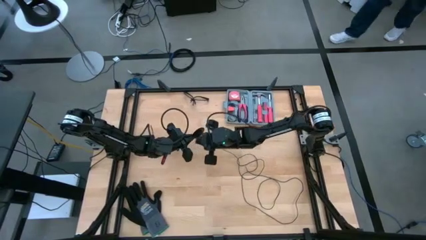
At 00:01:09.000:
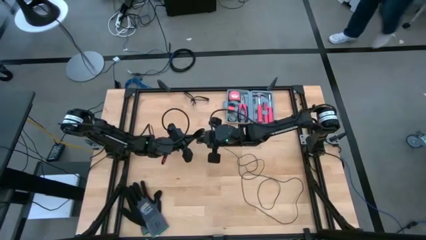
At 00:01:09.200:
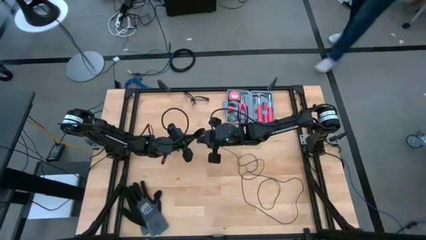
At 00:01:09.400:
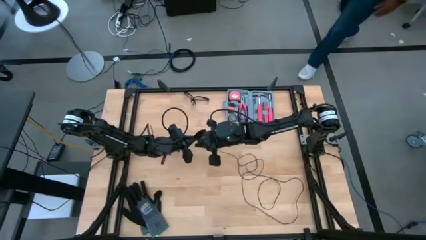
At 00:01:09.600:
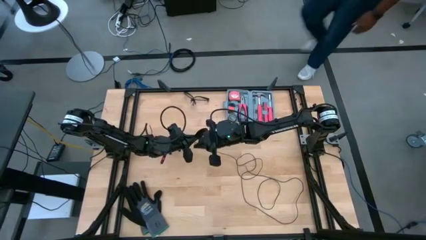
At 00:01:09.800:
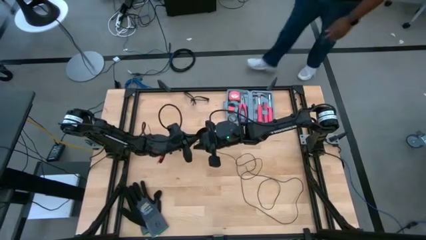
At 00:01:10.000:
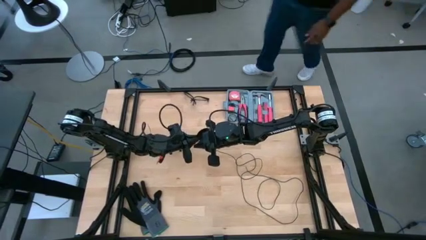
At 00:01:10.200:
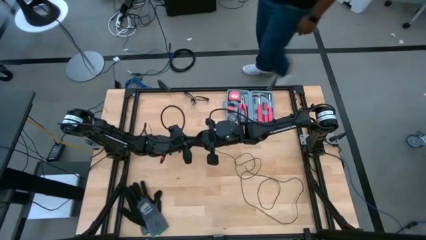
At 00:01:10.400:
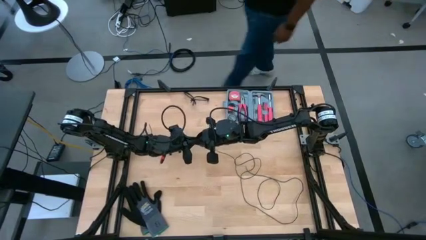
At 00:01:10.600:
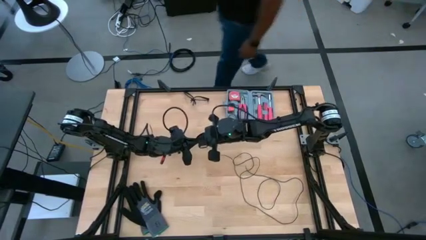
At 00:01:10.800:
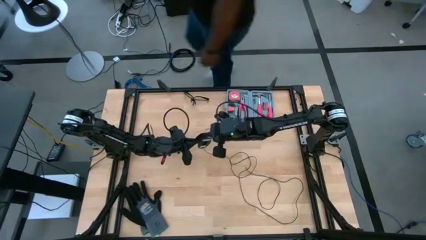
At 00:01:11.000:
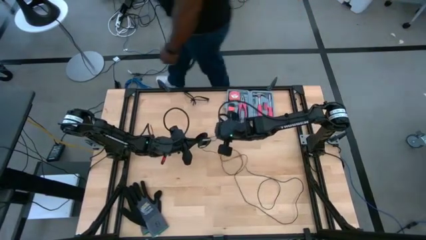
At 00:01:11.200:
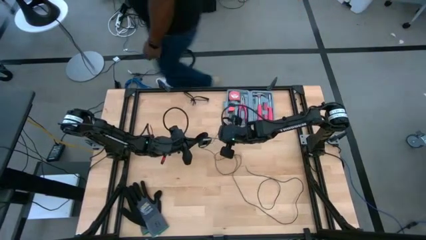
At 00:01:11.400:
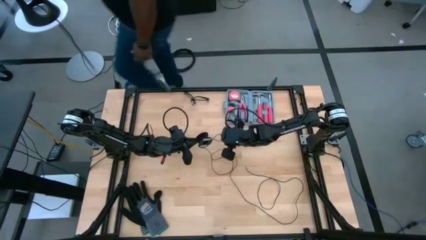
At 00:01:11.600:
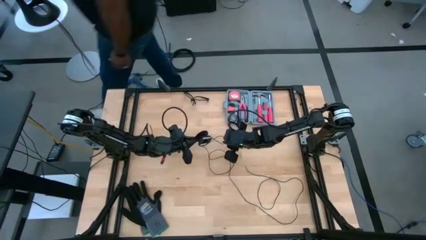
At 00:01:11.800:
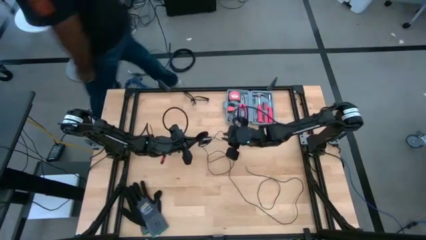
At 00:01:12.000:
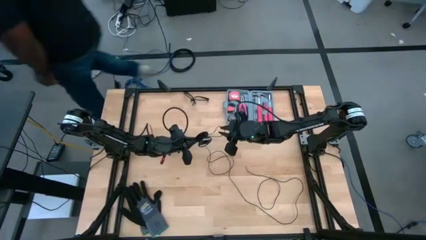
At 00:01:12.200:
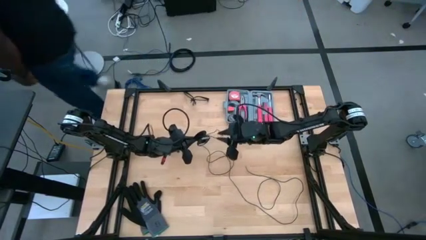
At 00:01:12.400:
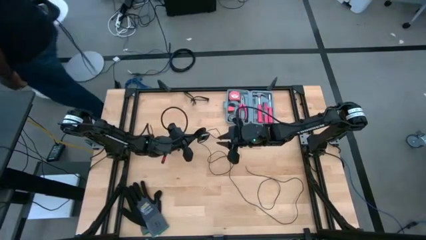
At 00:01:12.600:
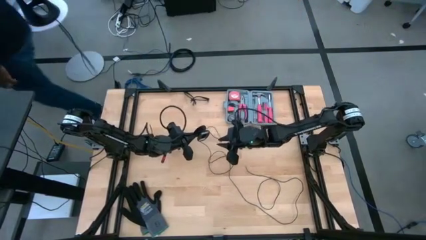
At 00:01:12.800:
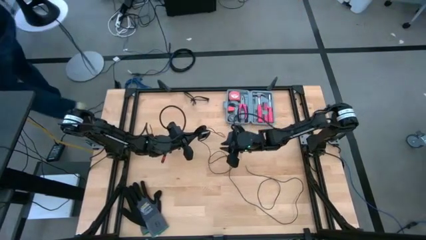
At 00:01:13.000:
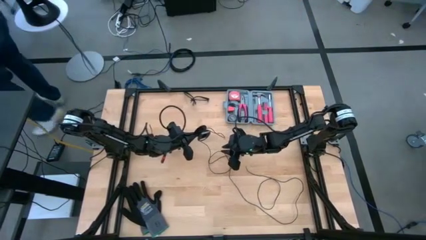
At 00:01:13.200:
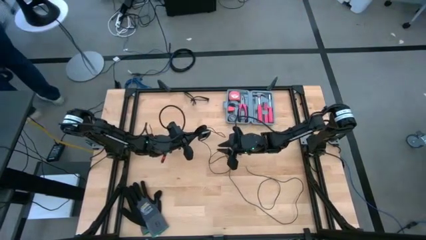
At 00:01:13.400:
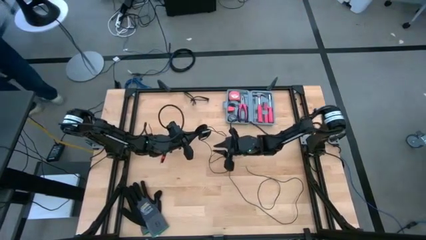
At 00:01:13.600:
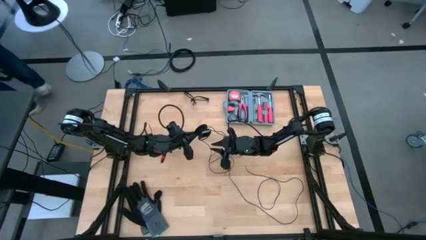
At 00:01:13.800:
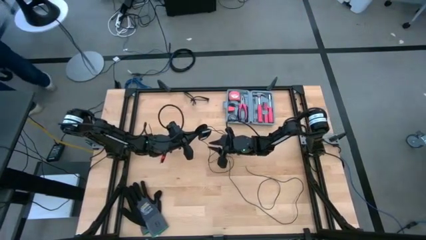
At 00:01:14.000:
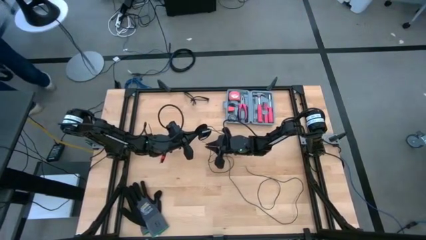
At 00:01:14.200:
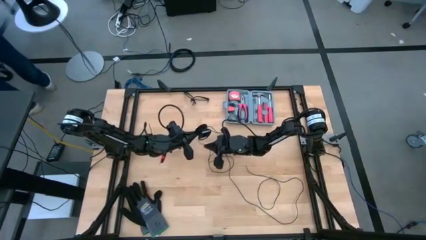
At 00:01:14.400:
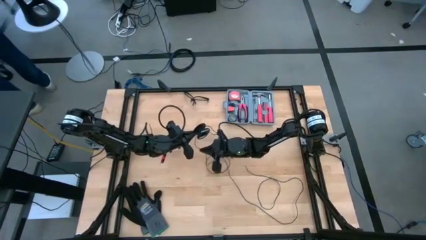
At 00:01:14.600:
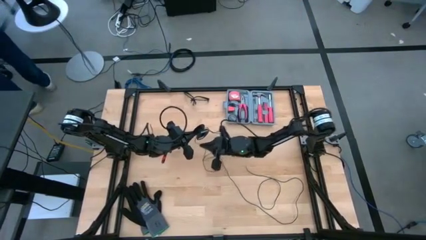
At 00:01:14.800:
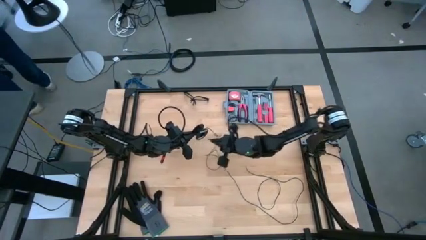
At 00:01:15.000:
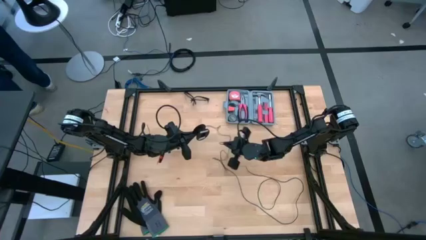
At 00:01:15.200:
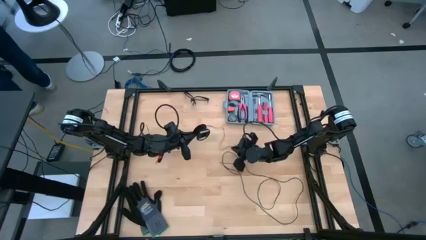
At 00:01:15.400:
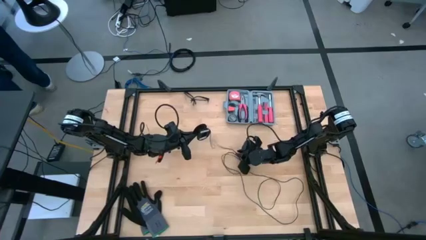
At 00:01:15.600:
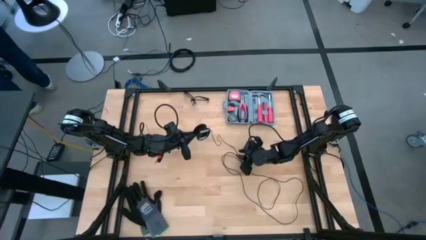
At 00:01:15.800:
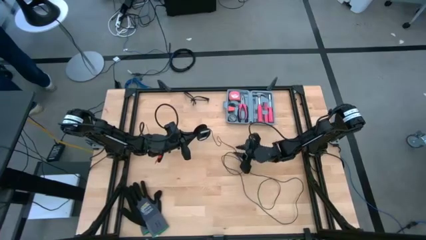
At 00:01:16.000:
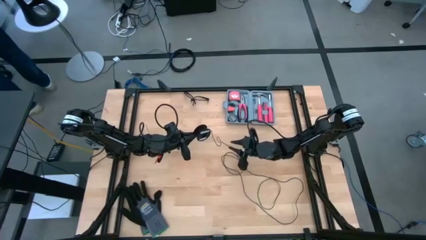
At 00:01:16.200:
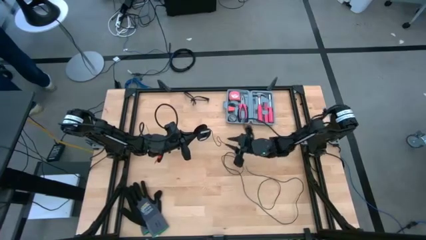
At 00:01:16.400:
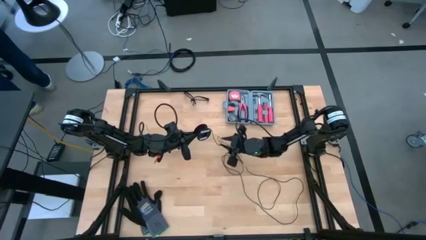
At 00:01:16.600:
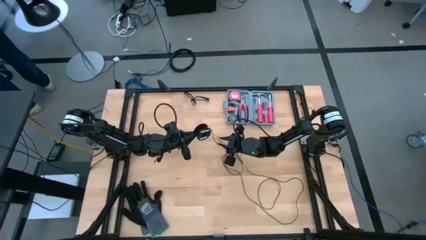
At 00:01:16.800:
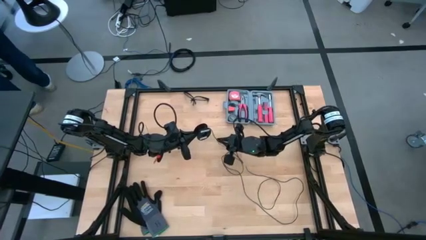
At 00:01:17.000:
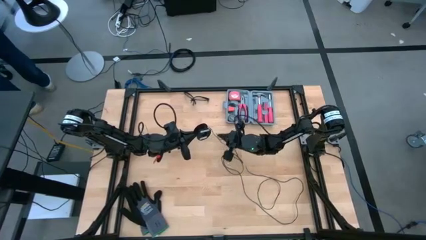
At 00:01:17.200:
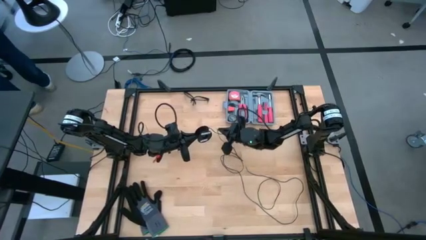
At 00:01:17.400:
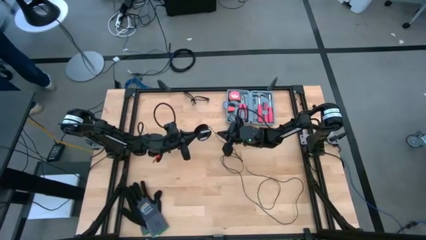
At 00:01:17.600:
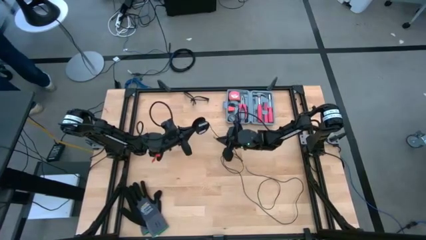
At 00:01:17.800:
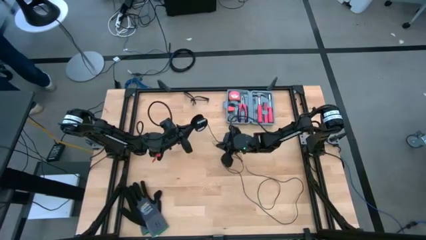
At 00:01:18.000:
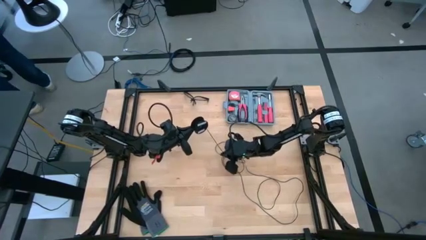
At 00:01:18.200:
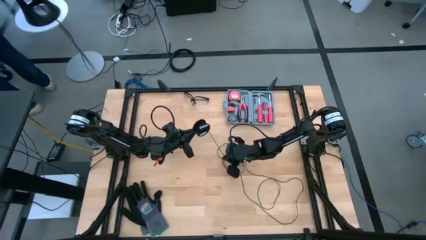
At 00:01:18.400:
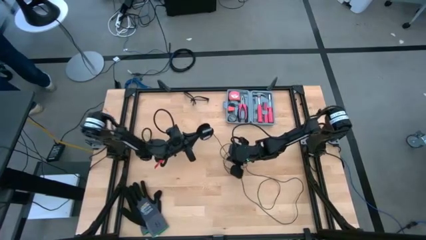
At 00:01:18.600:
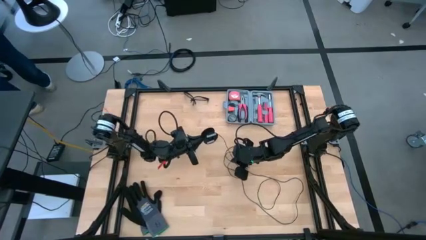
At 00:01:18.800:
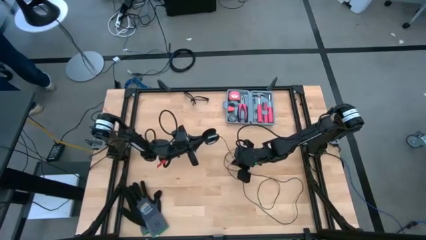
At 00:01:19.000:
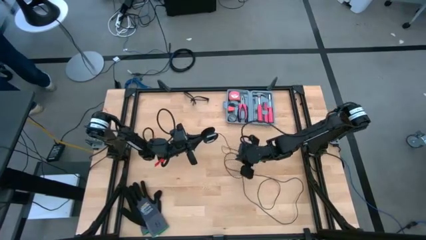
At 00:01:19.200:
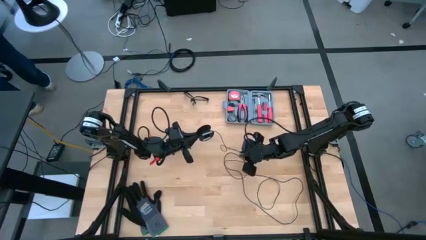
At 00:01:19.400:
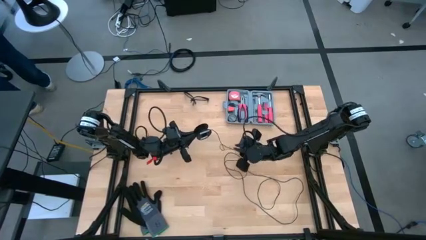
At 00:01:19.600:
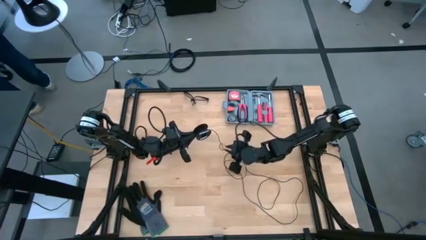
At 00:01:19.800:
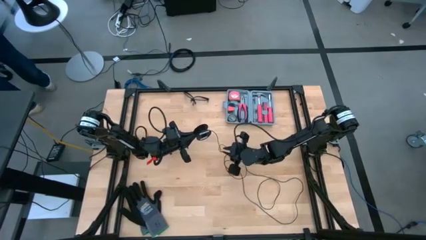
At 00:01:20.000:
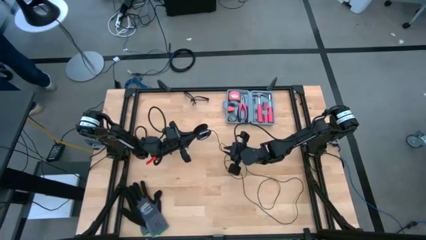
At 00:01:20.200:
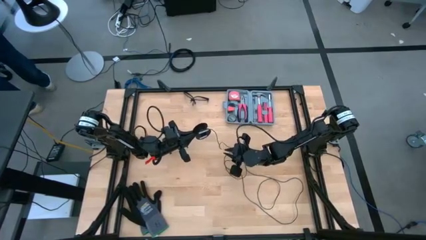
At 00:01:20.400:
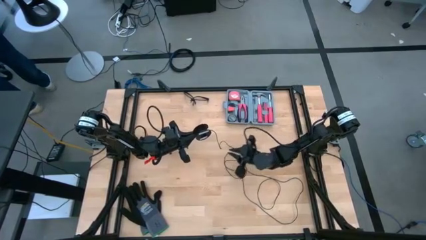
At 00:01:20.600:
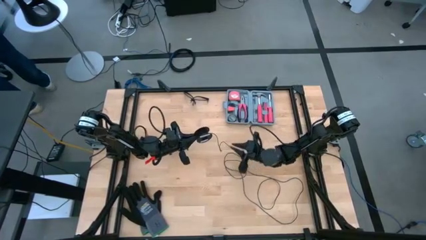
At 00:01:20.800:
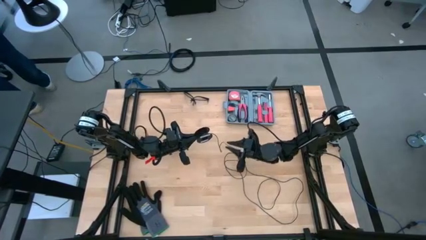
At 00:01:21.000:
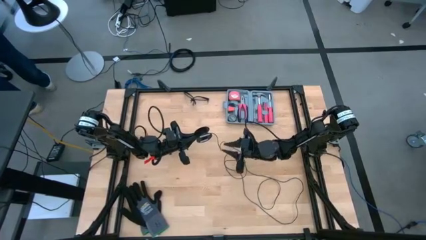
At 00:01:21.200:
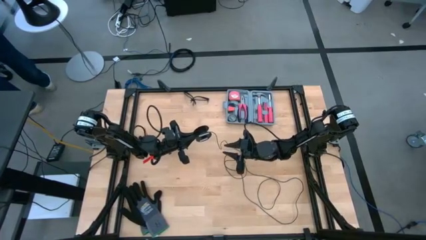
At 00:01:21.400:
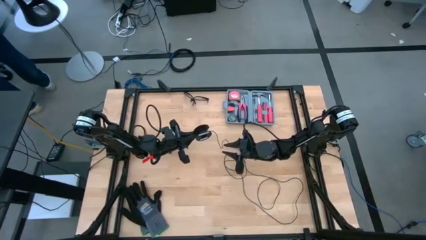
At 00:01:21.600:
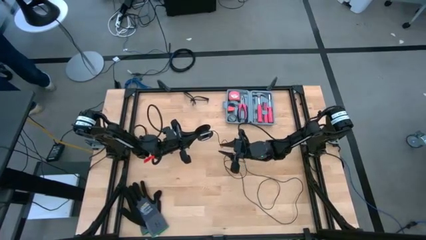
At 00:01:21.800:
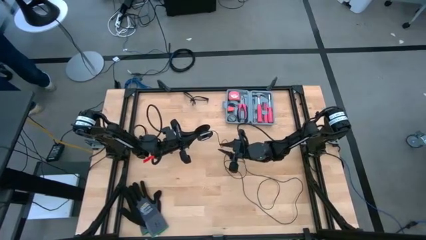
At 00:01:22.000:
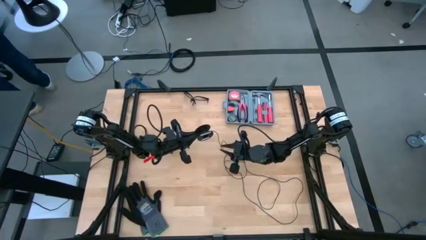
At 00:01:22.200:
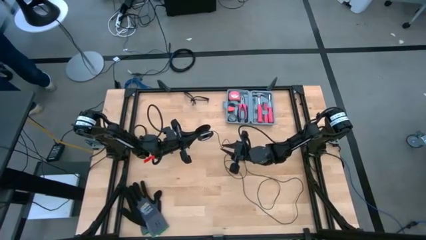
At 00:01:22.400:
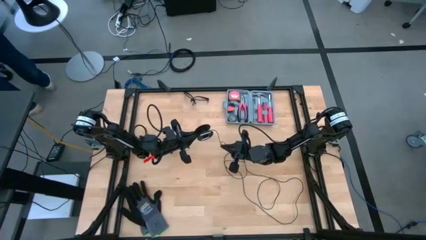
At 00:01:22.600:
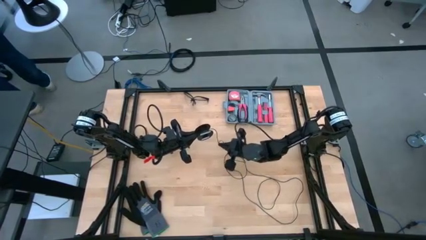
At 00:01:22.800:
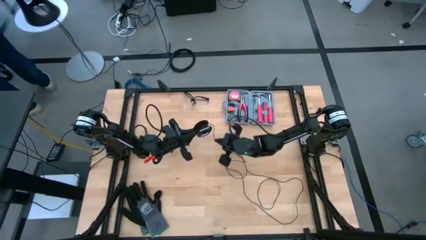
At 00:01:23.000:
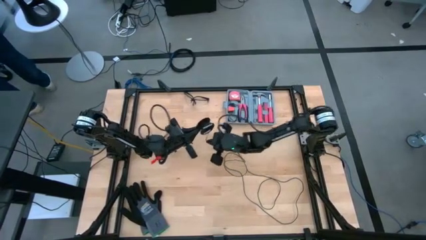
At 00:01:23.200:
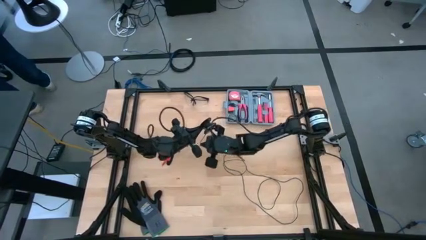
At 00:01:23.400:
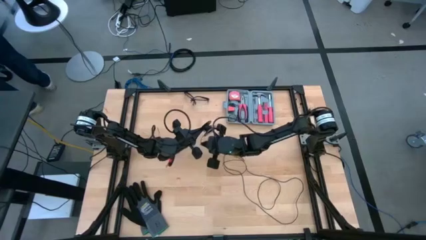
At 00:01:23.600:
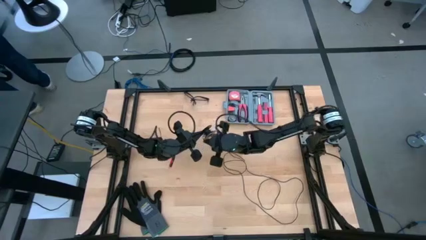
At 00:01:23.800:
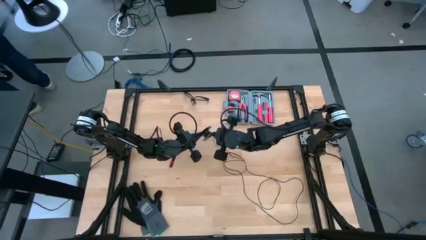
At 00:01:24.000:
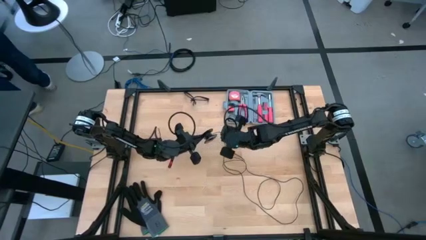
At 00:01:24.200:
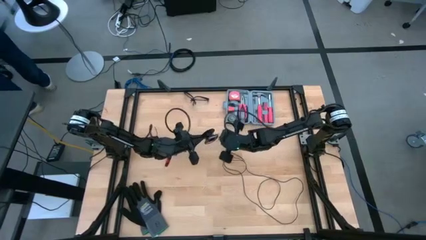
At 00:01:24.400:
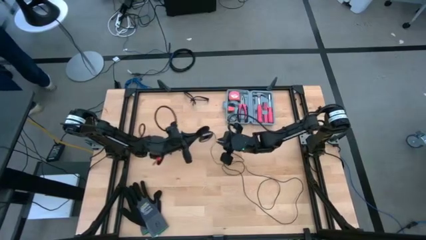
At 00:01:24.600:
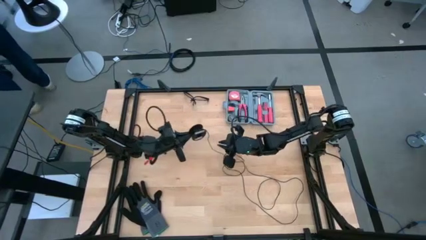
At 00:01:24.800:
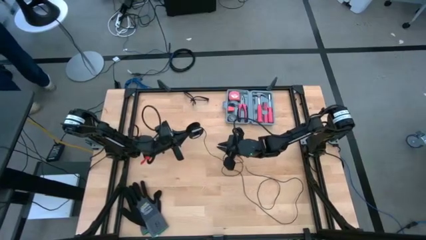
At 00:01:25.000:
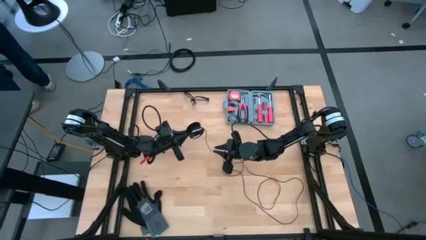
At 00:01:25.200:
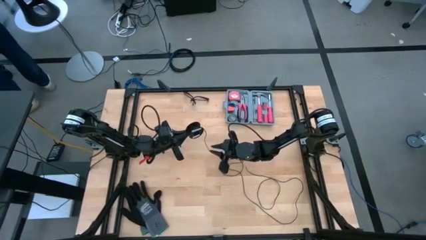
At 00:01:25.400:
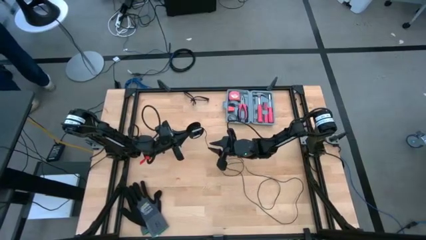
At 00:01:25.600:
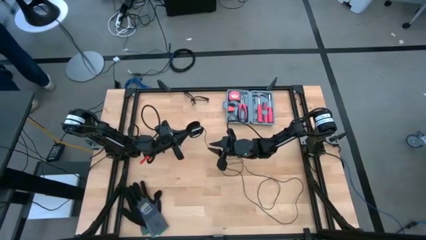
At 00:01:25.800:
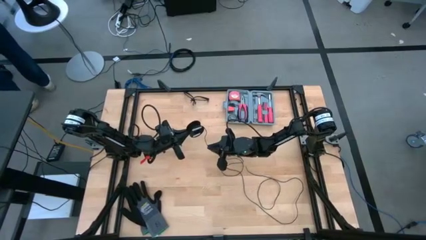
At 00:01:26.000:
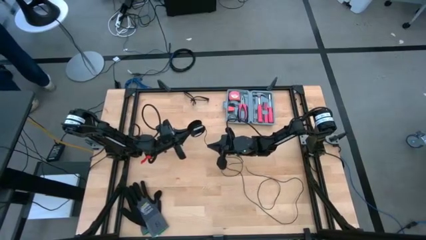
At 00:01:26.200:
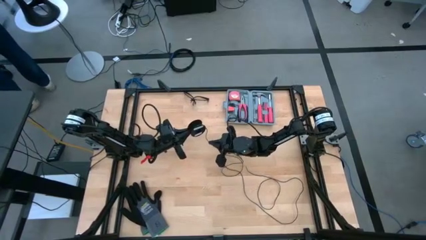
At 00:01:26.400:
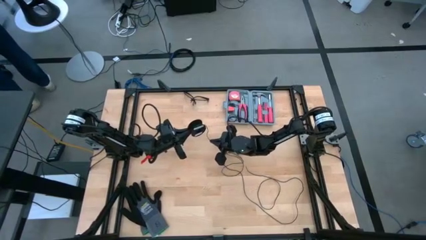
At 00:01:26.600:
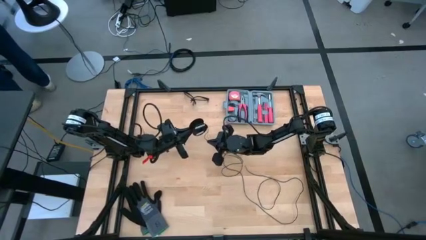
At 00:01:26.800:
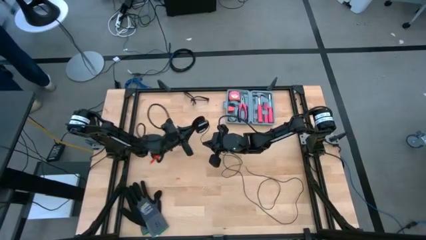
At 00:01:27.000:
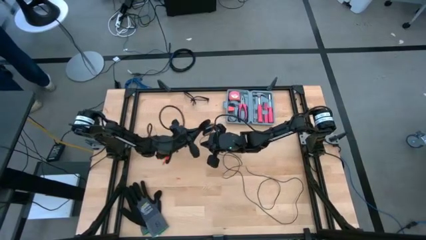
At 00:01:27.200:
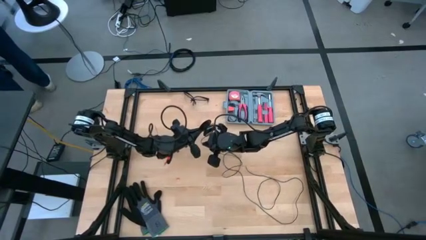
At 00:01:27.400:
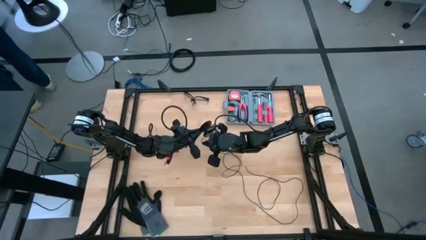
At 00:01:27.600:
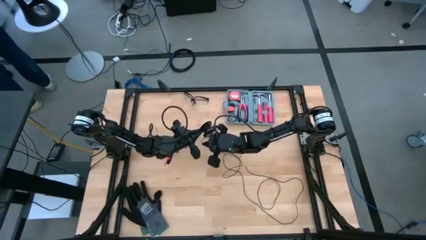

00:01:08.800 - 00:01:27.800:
Task: Coil cords
Coil the black wire onto the spool
